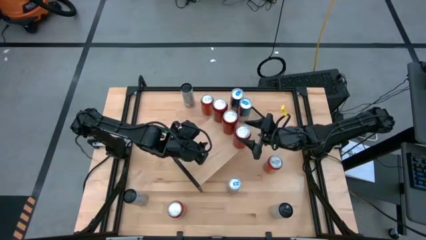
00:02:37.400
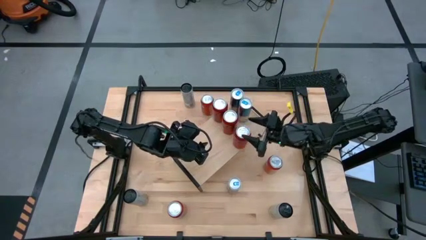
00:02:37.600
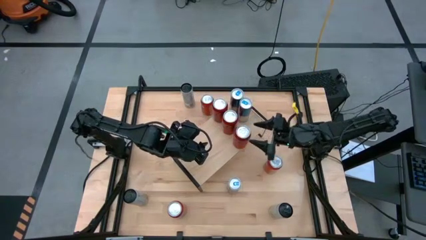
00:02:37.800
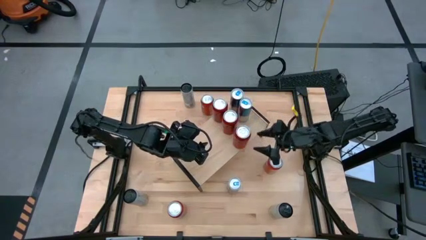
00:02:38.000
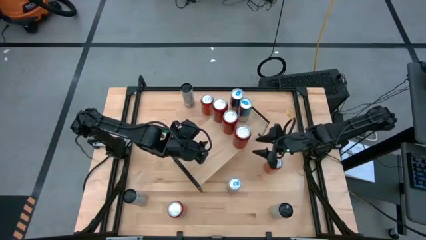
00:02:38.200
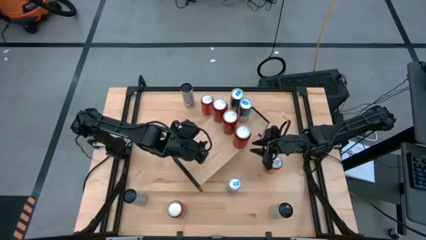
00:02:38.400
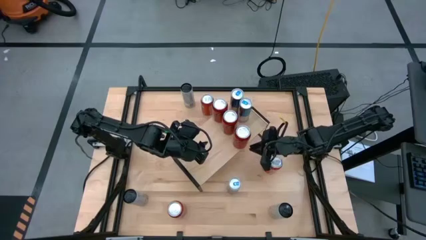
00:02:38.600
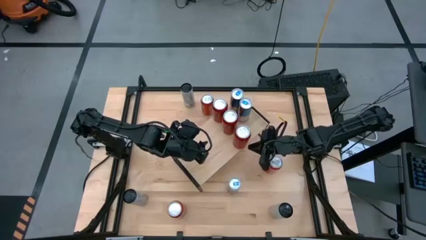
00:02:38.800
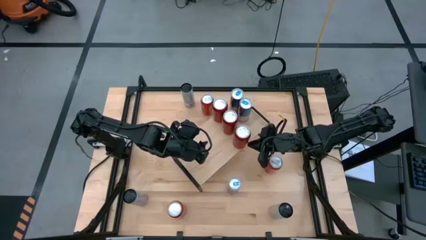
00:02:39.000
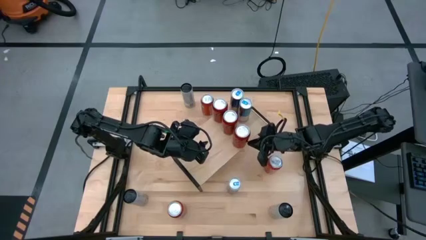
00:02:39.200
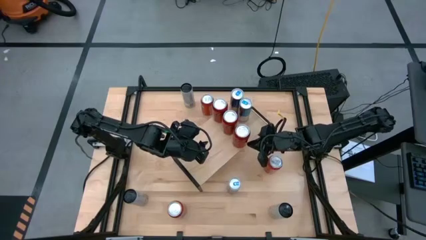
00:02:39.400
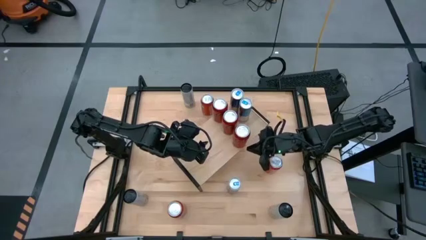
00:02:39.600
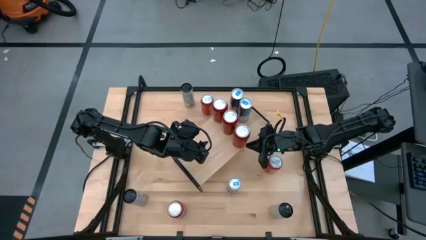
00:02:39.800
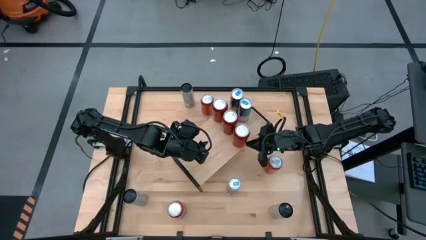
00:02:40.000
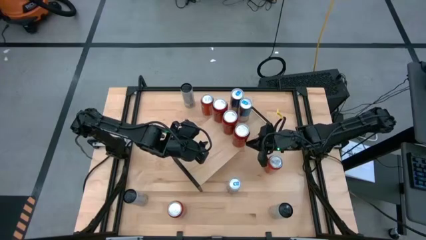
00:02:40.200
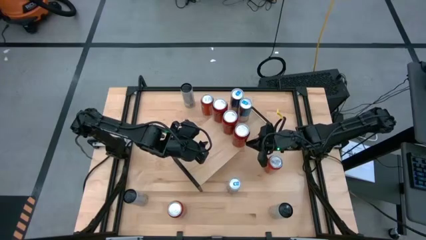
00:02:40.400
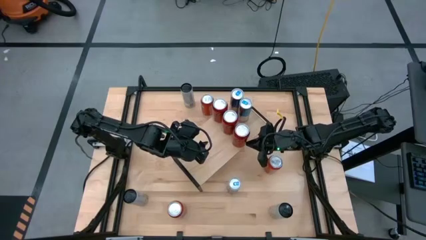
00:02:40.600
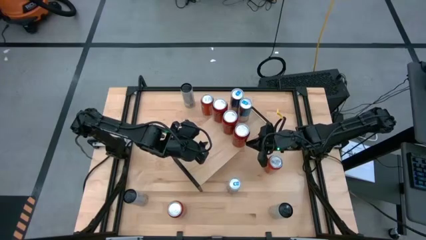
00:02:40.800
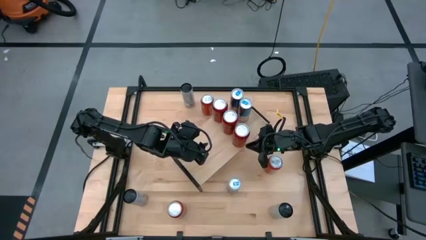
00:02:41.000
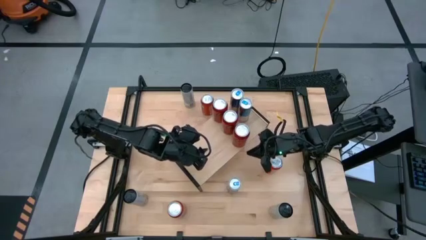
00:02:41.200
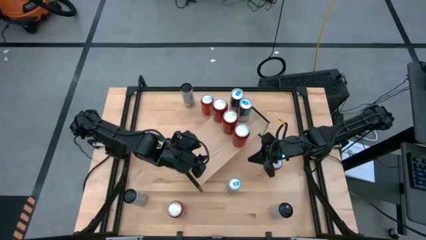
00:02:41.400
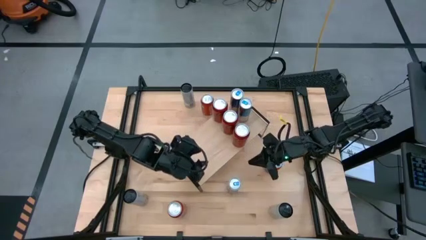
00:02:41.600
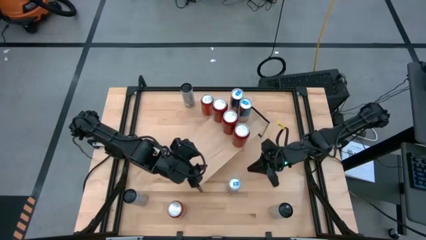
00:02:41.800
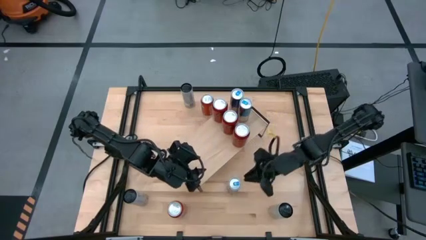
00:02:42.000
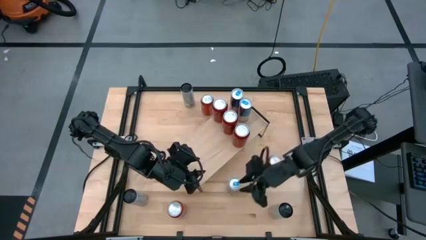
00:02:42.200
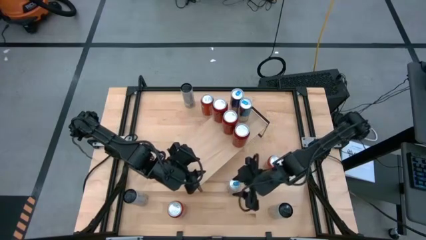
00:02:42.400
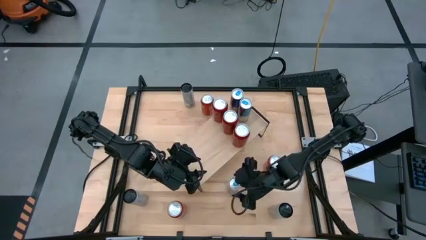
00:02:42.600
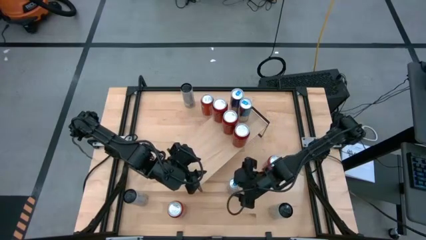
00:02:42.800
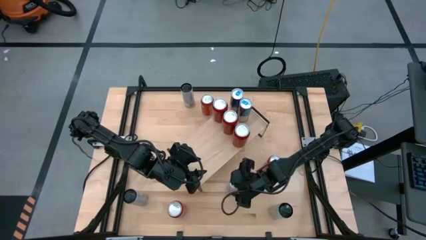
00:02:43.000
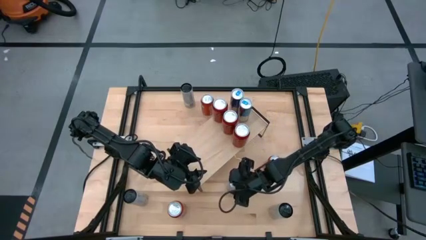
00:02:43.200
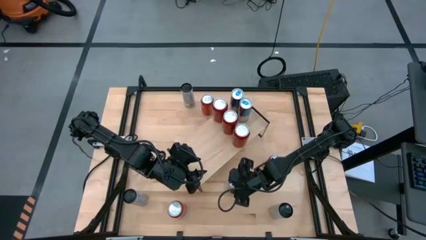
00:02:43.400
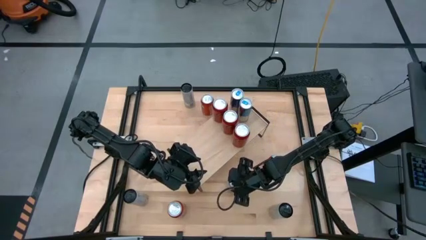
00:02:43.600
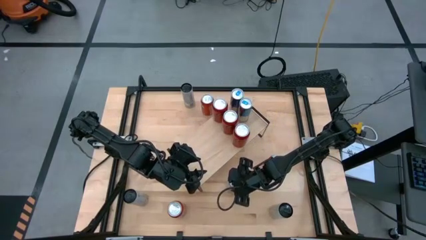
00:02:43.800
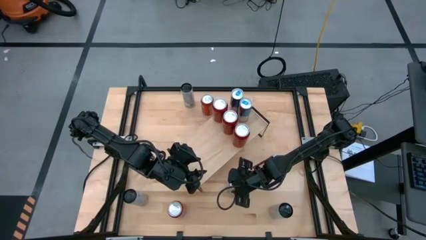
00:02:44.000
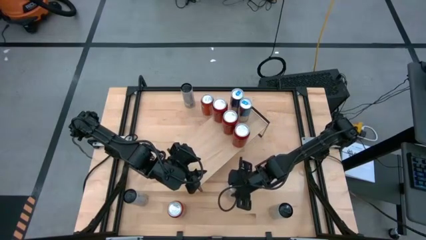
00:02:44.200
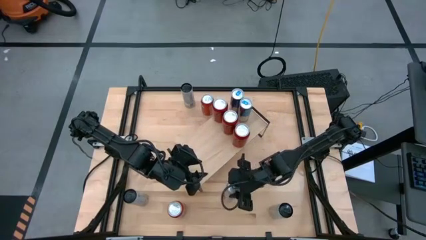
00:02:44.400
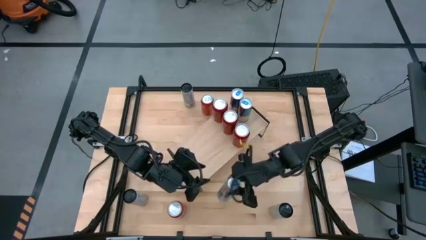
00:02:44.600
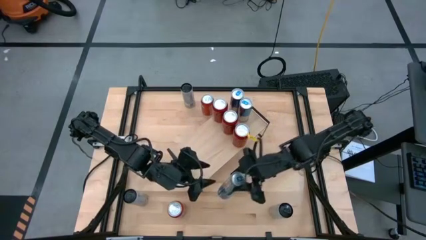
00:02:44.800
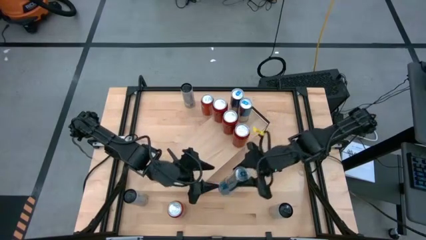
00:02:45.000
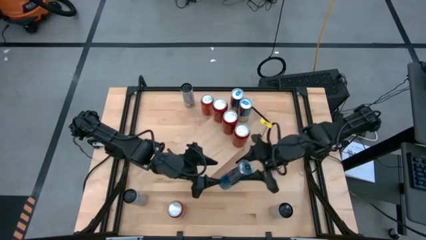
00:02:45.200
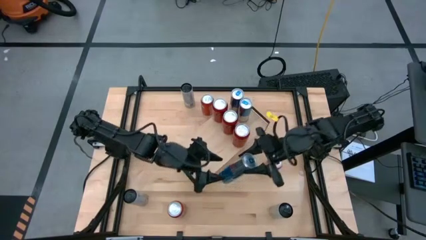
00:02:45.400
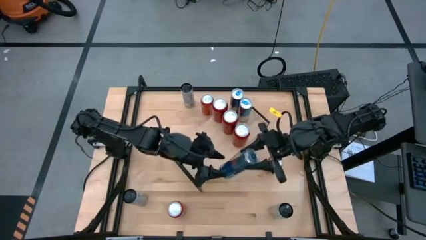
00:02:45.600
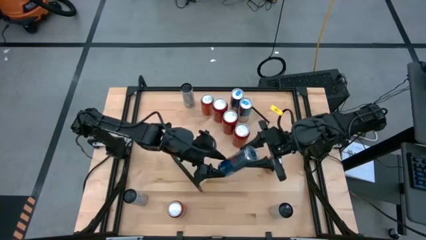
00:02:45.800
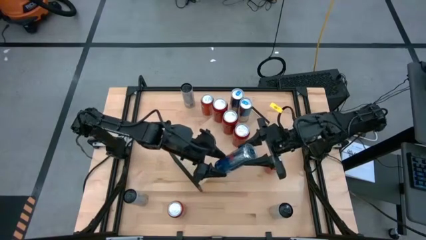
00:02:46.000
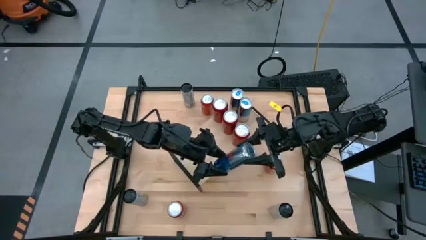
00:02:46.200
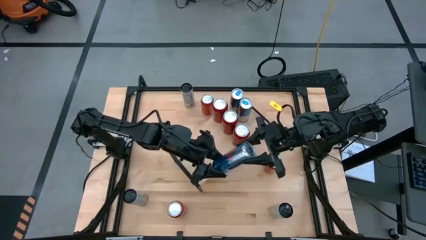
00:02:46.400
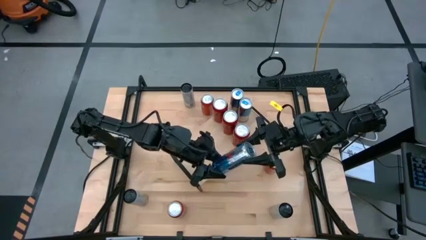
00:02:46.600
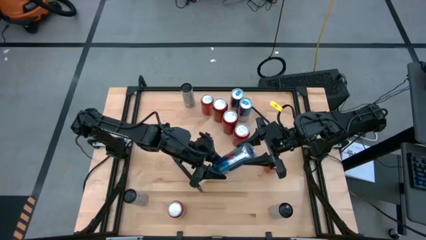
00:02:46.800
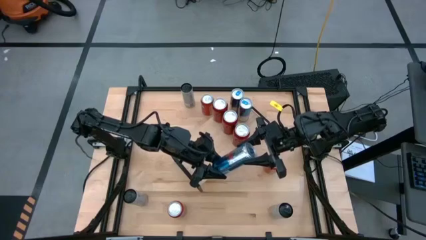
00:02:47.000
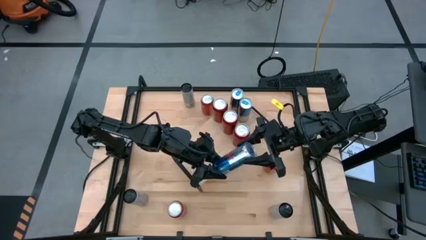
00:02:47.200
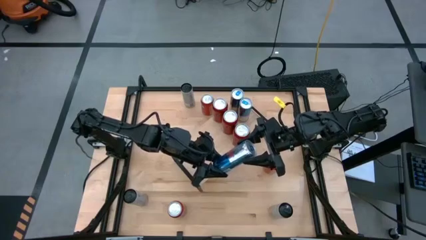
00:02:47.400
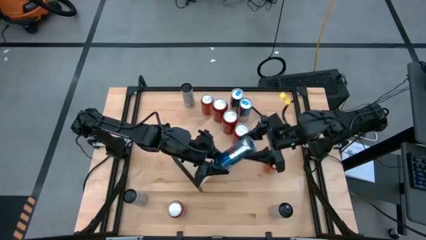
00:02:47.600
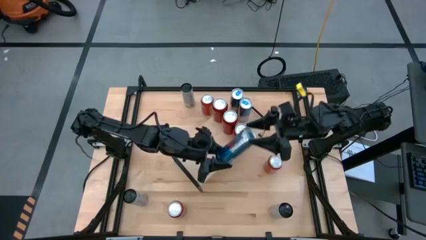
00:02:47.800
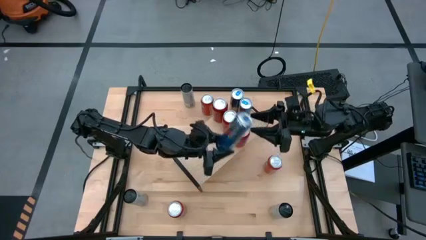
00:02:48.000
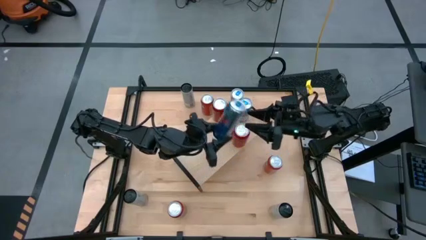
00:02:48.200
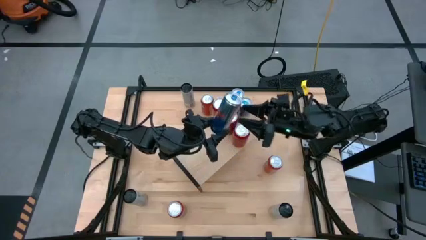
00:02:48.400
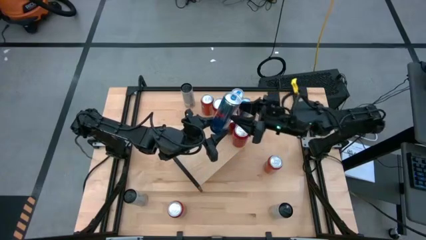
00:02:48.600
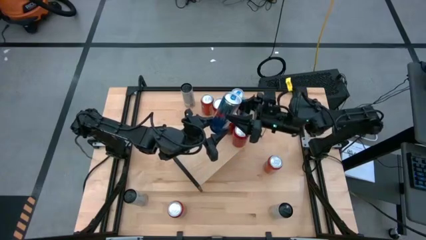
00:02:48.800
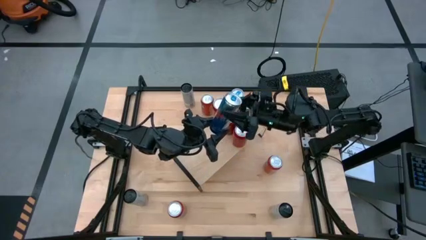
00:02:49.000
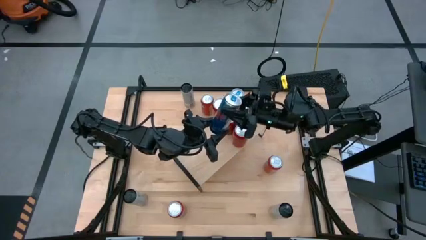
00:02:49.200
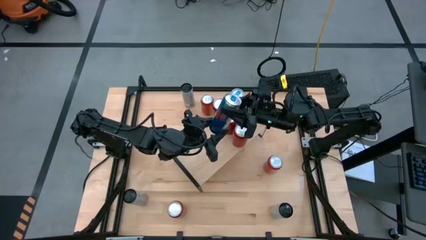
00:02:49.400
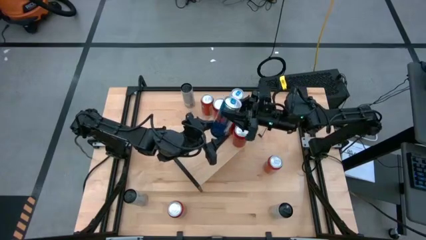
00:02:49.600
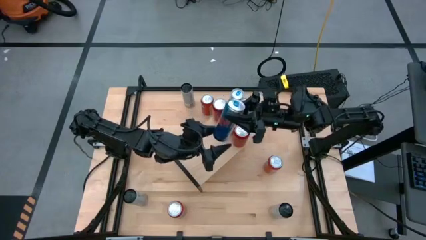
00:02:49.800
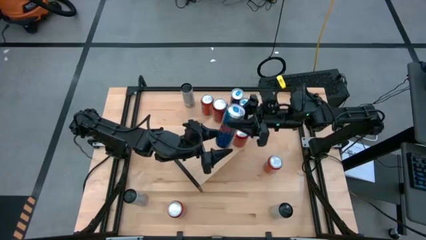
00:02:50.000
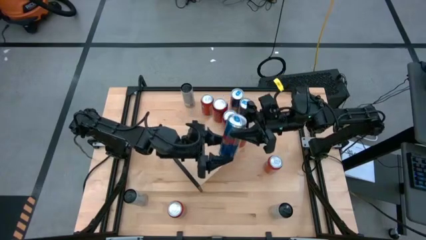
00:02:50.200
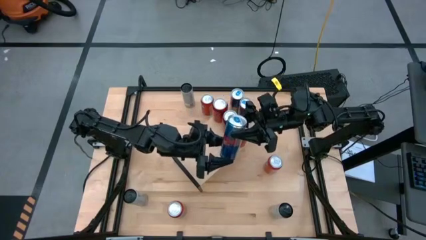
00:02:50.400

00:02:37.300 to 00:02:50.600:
Task: Place canned beverage on shelf
Put the blue soda can on the shelf

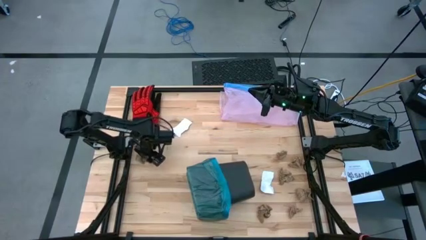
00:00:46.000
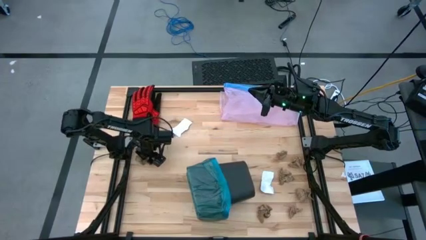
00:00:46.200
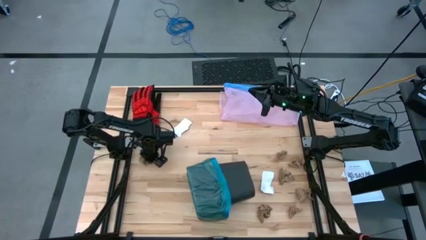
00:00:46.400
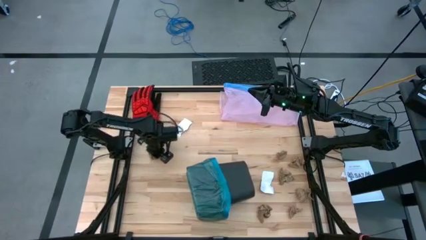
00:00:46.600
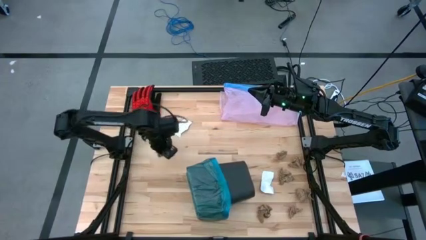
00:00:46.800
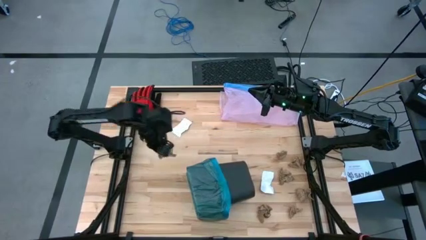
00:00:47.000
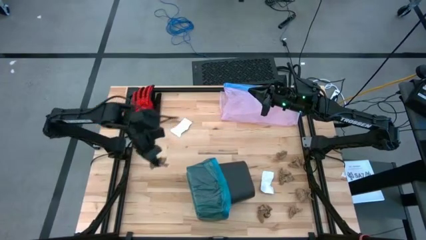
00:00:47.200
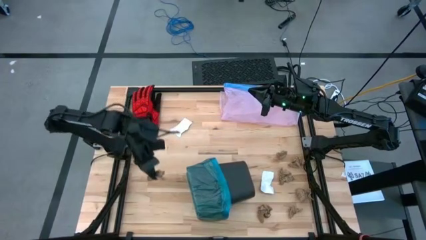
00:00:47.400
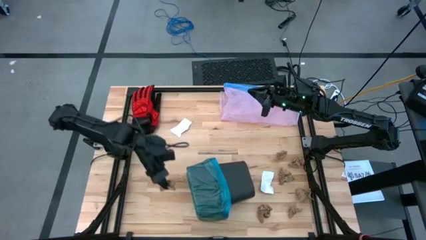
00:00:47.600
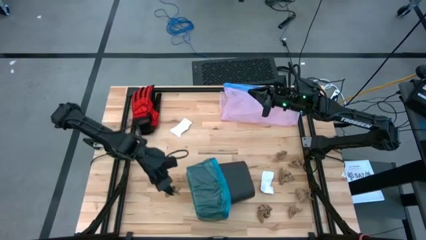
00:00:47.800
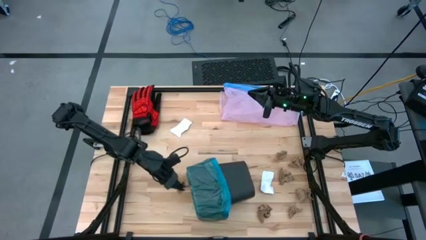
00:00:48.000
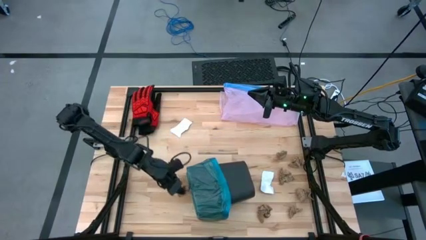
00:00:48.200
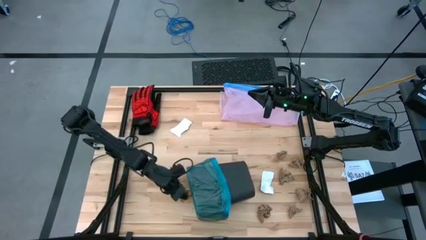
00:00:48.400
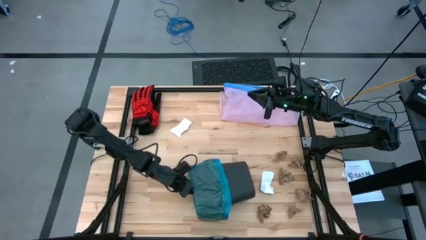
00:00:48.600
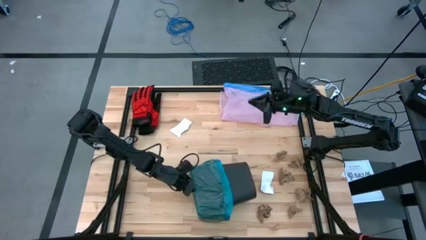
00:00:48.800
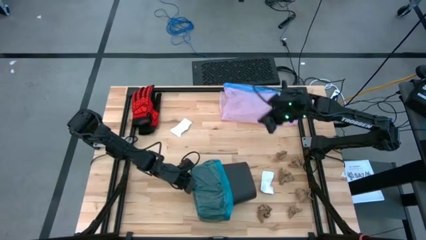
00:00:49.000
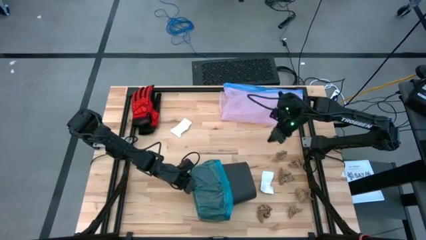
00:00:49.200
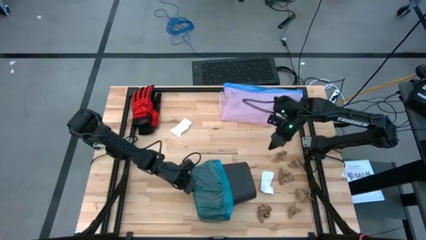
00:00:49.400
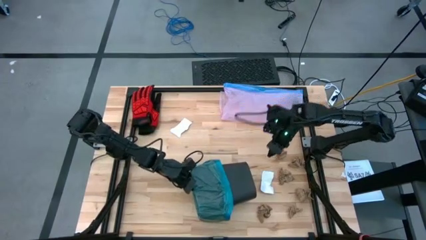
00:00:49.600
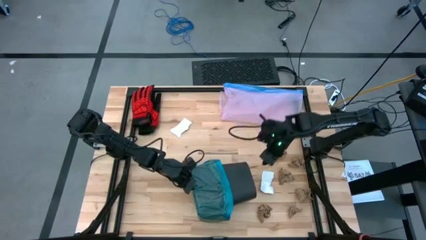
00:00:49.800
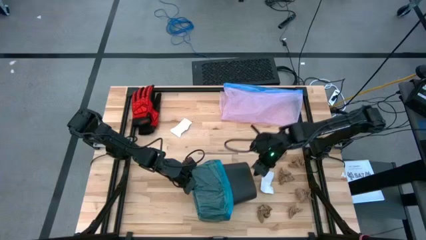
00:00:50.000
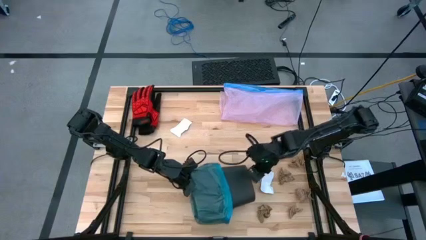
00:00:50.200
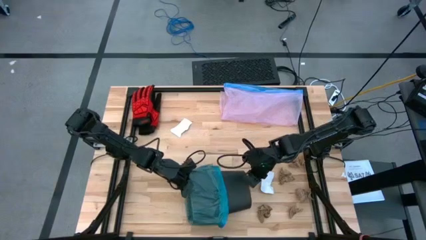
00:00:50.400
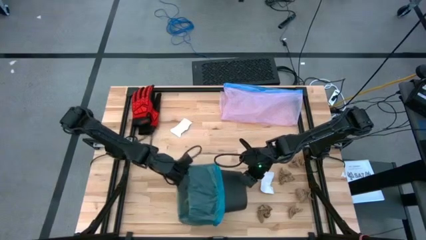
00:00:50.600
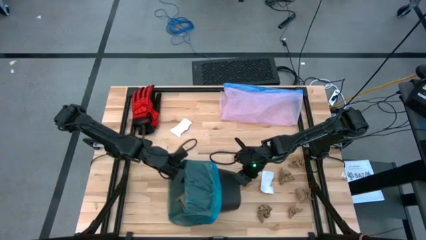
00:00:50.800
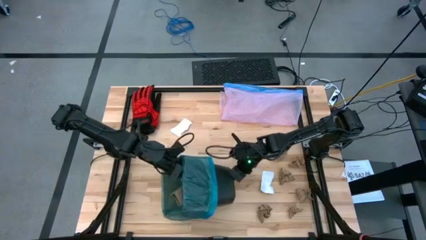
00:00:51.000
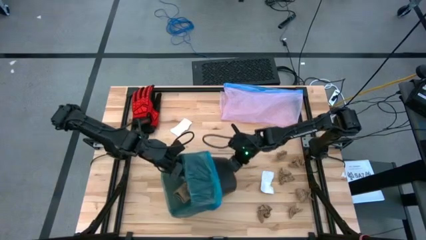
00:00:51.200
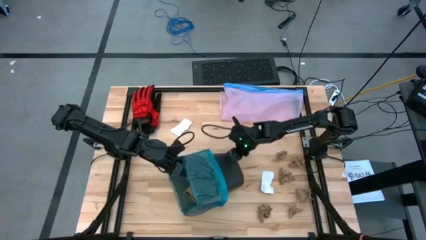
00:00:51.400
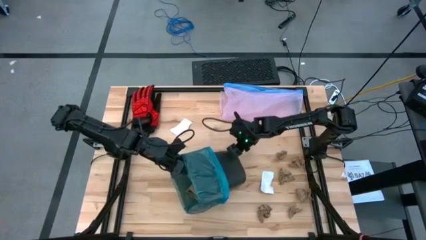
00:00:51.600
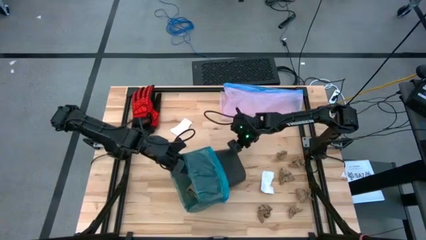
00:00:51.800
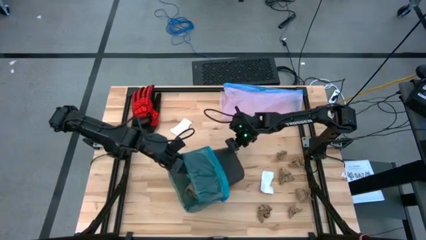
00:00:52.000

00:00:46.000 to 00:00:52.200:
Task: place trash/remove bag and relplace
Put the brown napkin into the black trash bin
